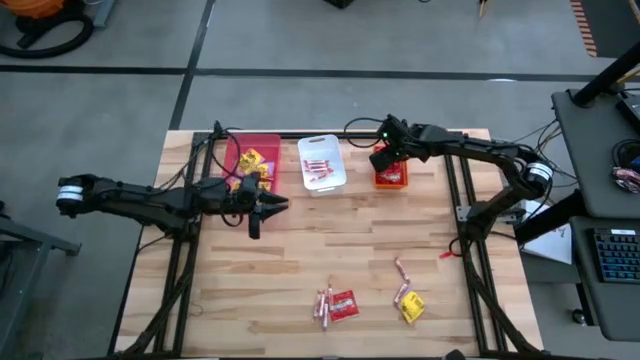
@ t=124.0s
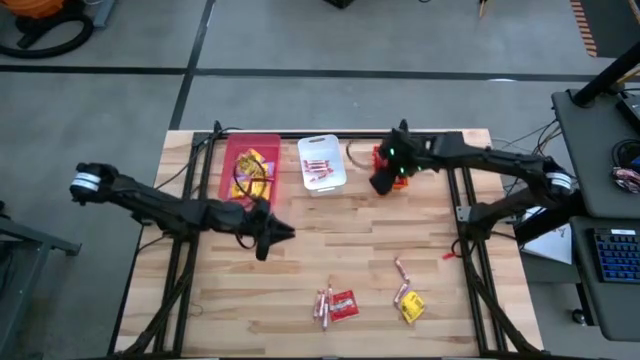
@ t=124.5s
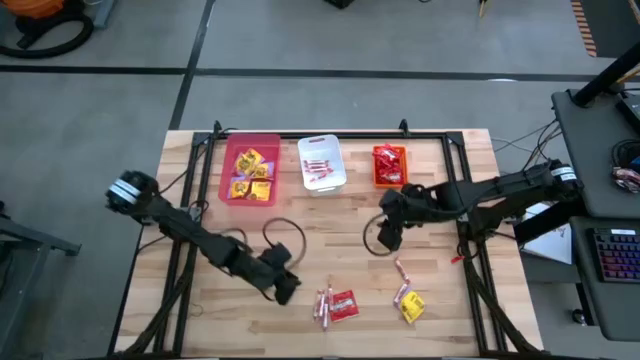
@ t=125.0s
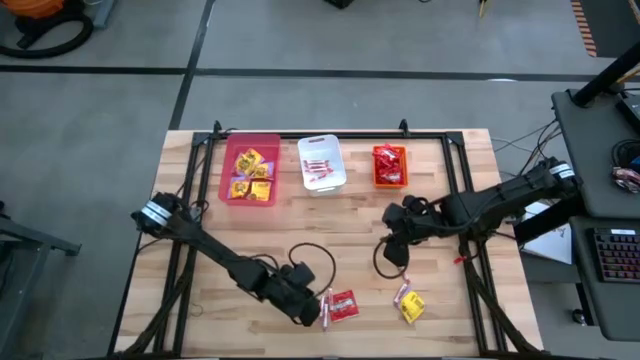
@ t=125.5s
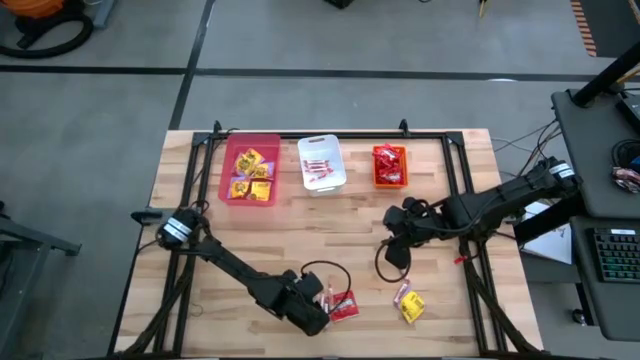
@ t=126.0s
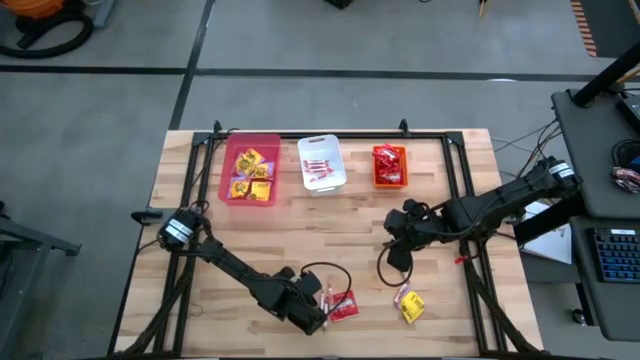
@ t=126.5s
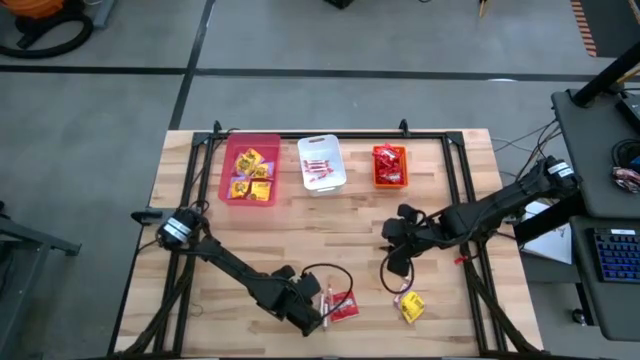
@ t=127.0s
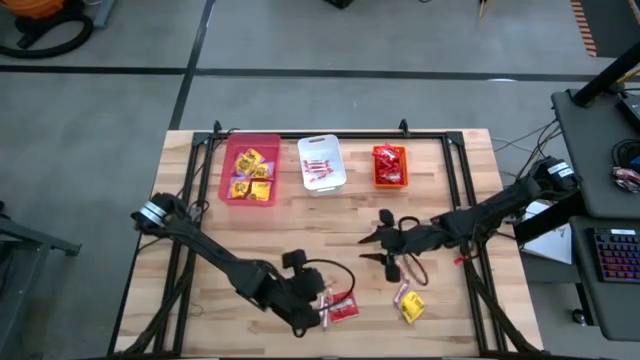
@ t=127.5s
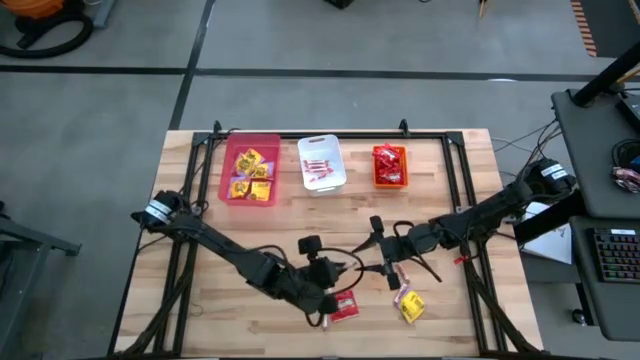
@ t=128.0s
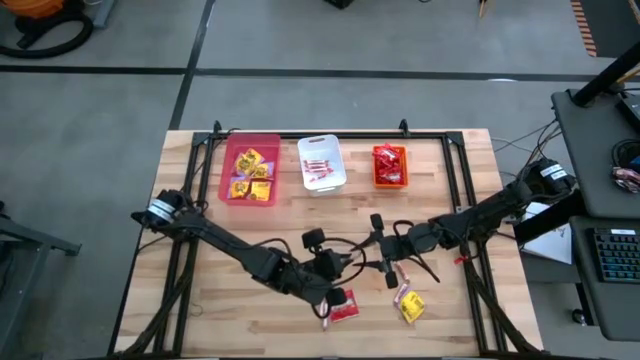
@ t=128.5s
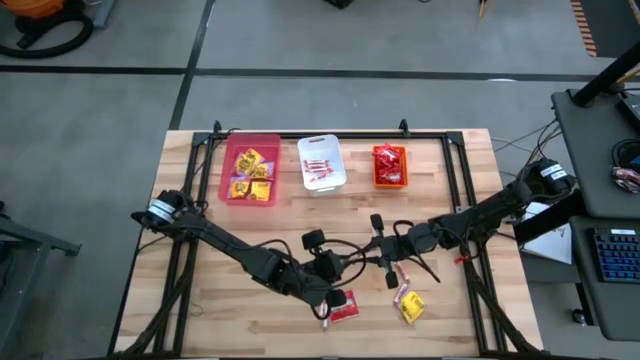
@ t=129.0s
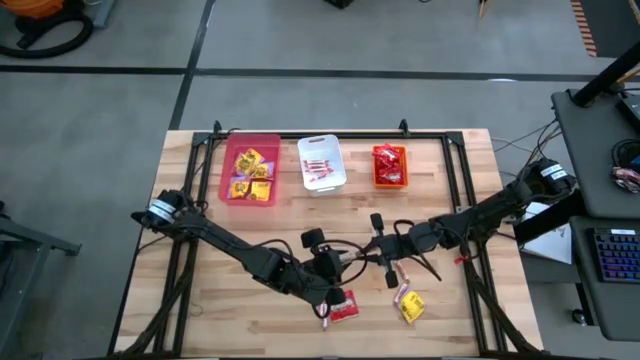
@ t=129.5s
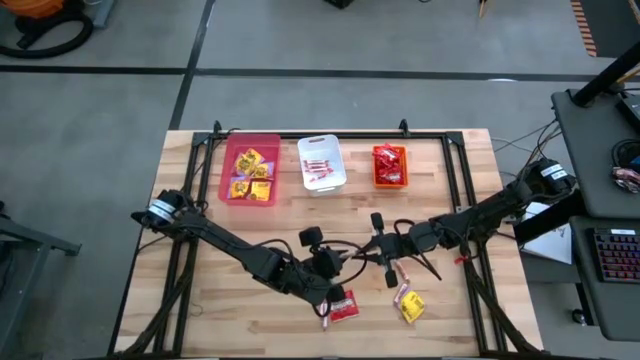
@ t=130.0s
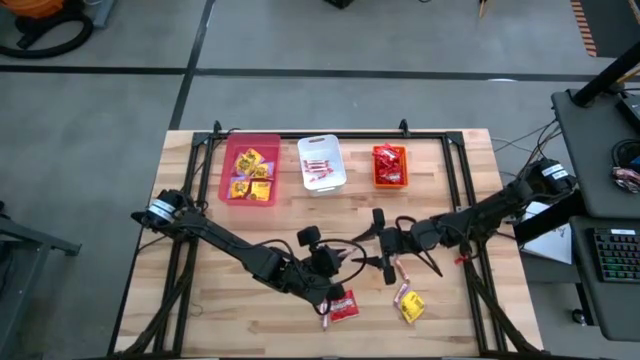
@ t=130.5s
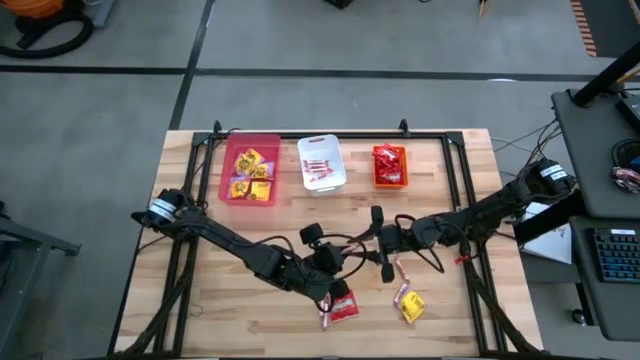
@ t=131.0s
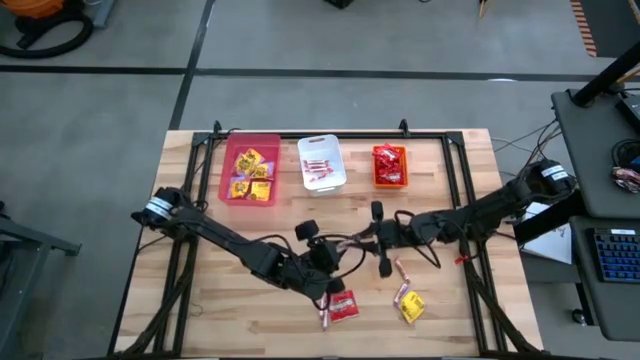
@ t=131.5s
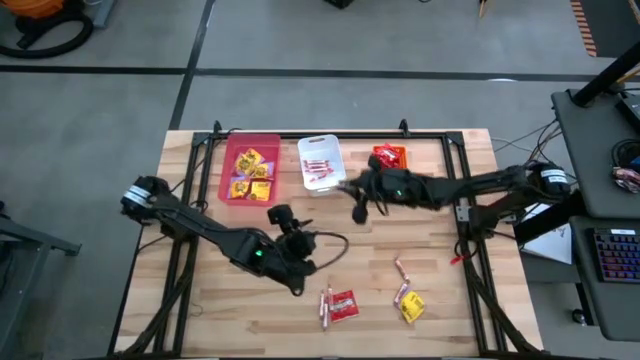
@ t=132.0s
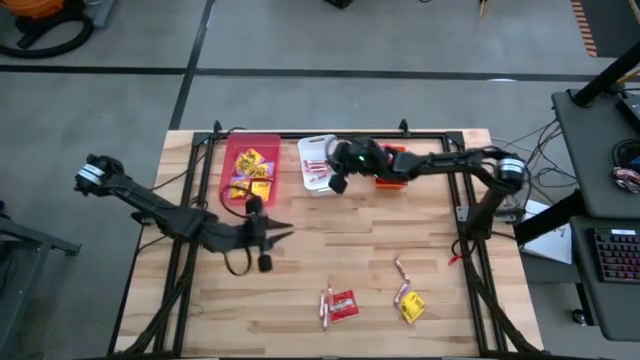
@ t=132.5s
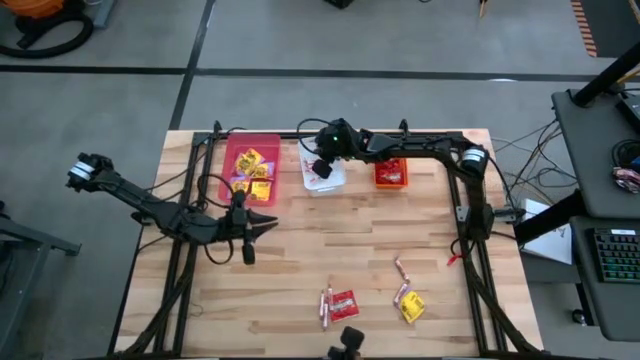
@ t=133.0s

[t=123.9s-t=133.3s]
Task: Sort candy
Put the white candy into the white bin

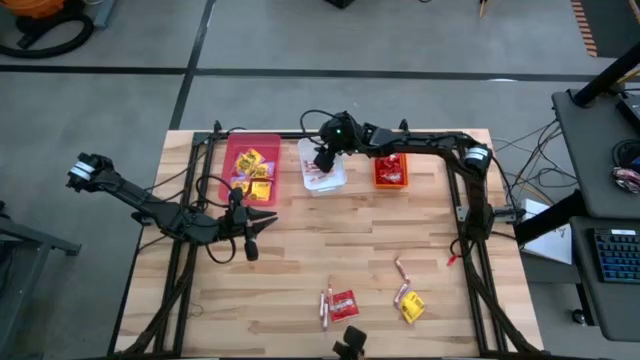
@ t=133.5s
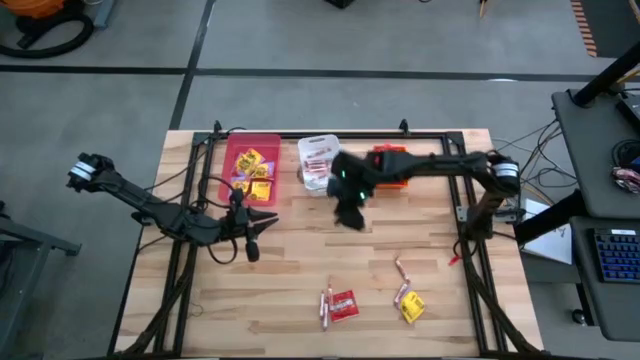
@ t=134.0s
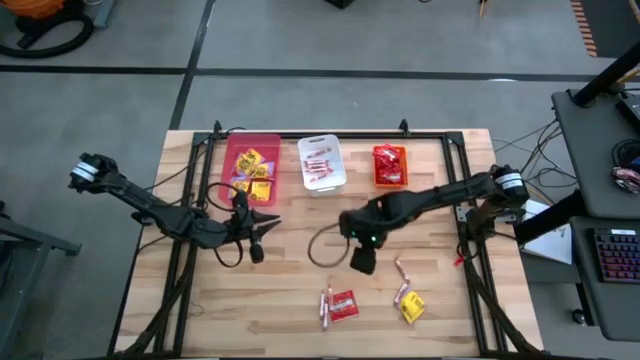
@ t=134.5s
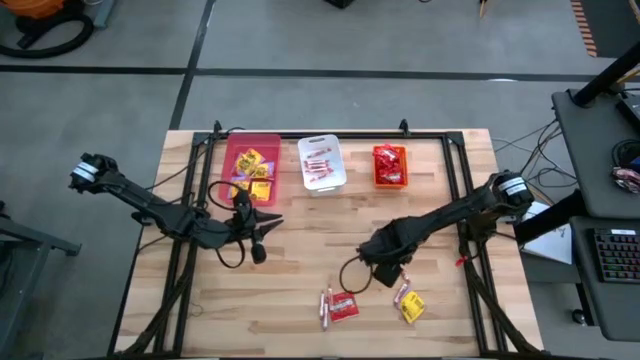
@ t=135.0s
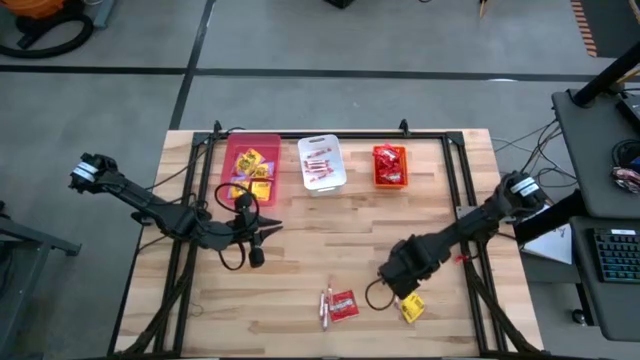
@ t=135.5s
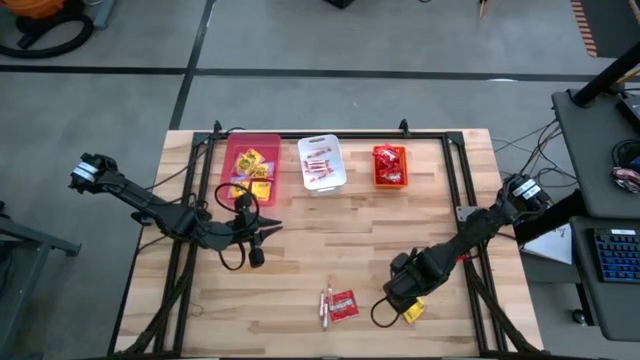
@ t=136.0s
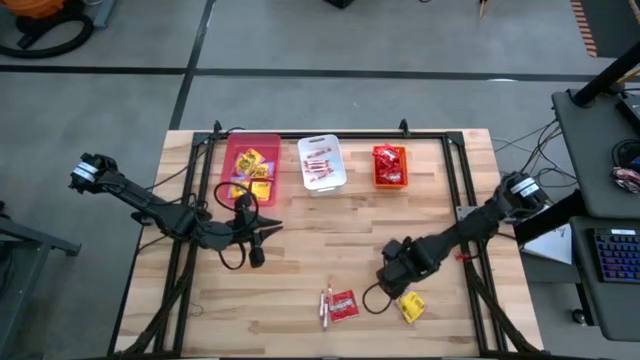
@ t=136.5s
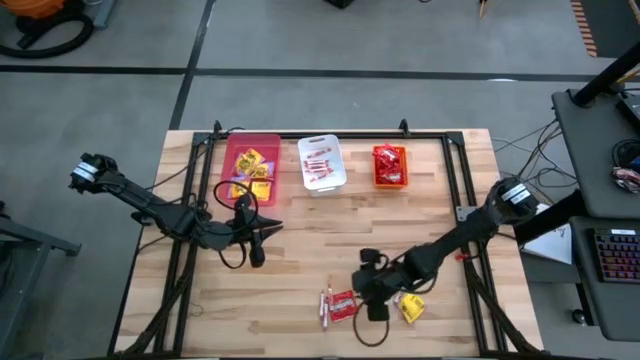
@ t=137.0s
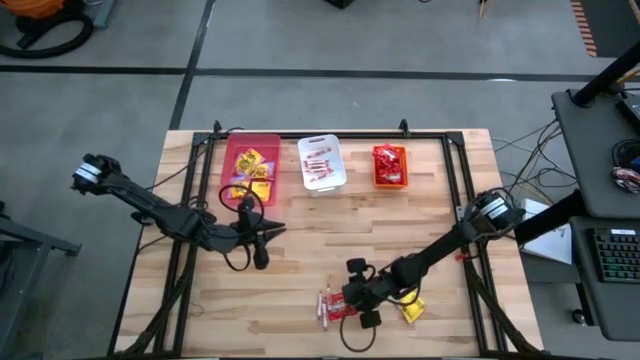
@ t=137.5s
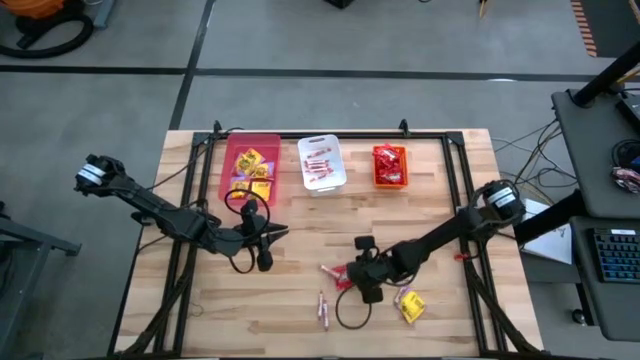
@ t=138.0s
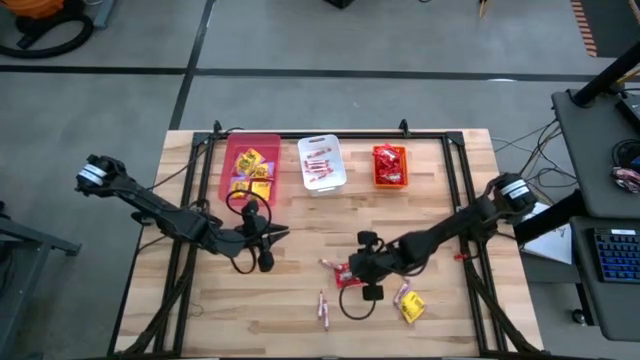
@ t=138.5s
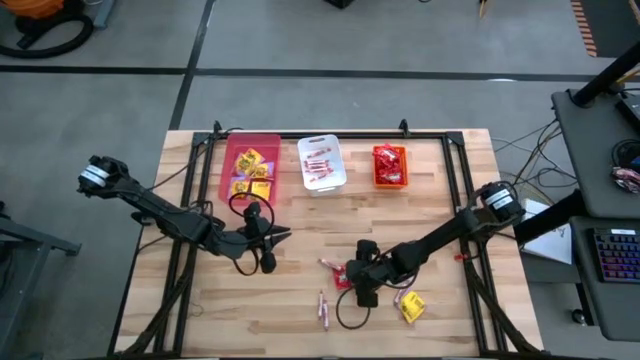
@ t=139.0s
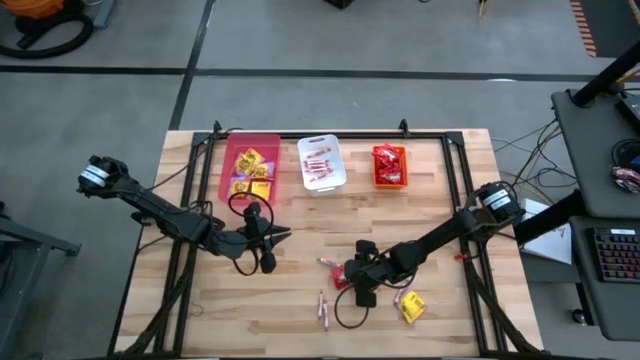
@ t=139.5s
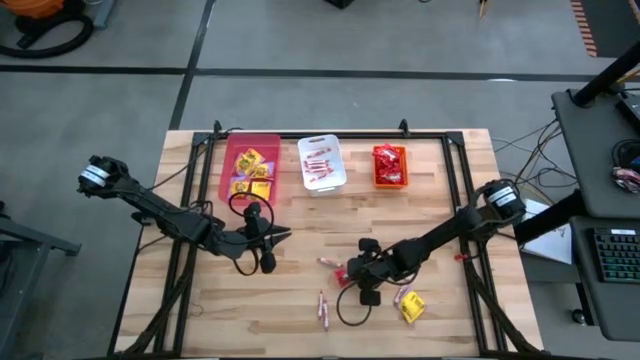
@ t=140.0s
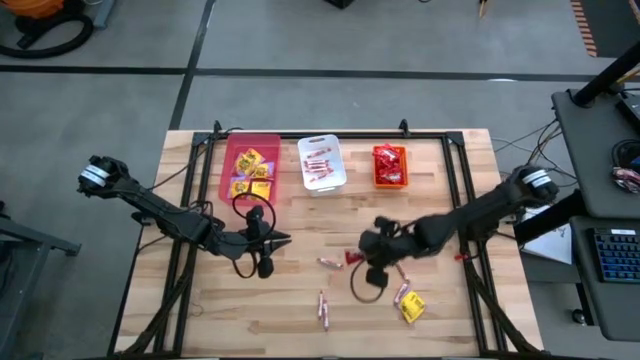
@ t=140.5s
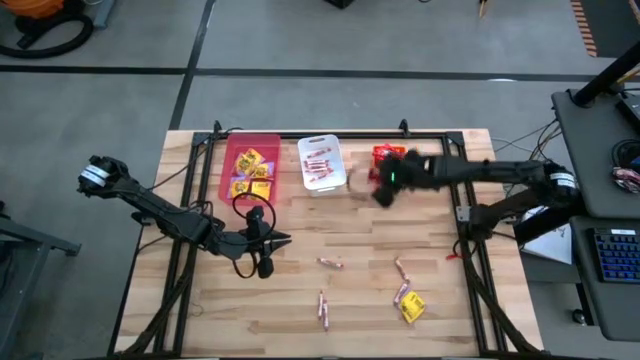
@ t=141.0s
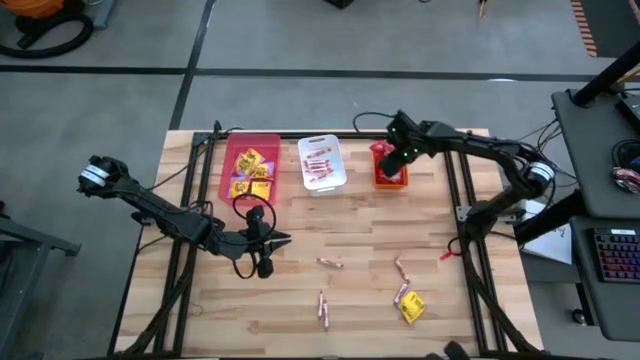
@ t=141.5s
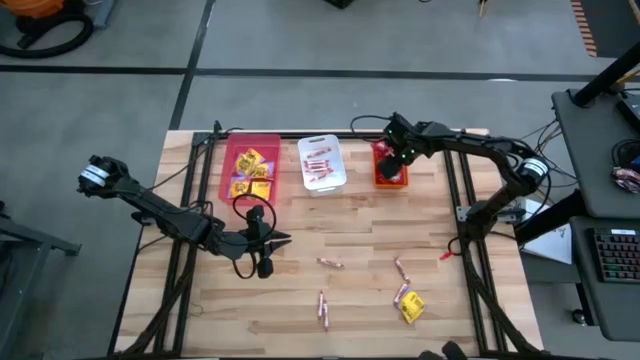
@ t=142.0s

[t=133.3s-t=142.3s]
Put the red candy into the orange bin

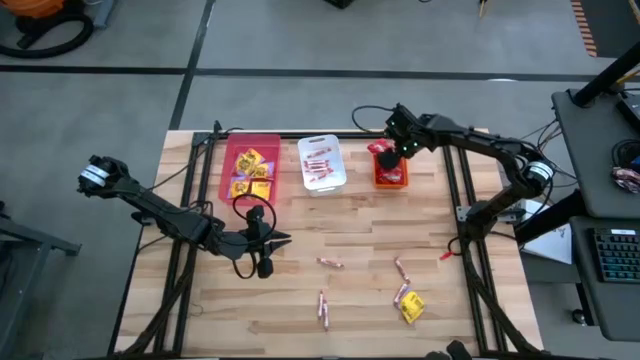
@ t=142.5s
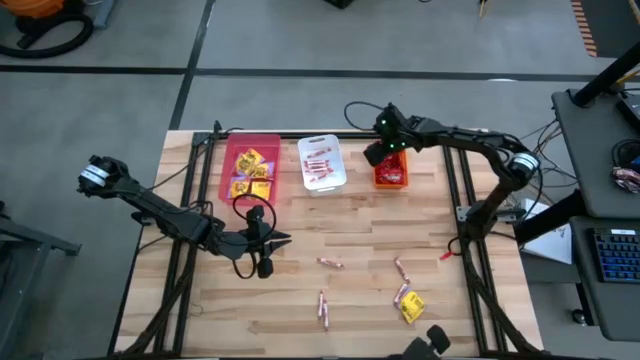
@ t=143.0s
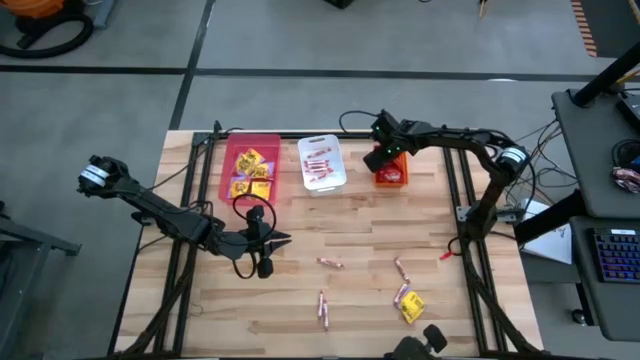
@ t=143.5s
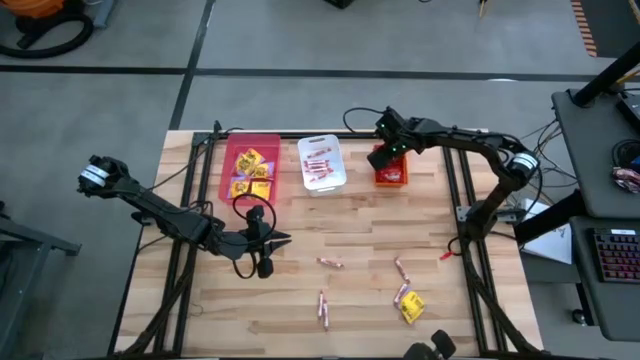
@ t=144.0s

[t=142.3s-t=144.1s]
Adjust the red candy in the orange bin
